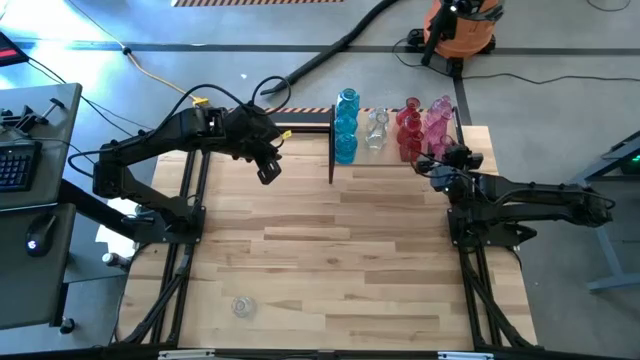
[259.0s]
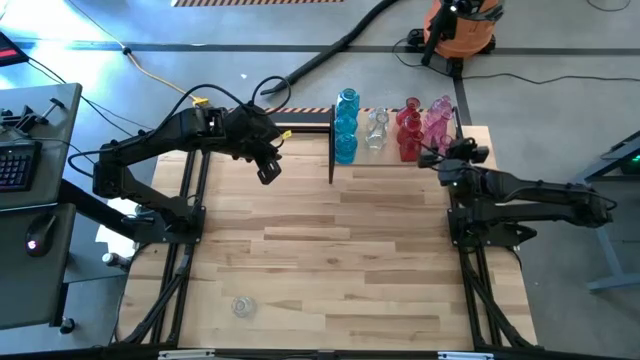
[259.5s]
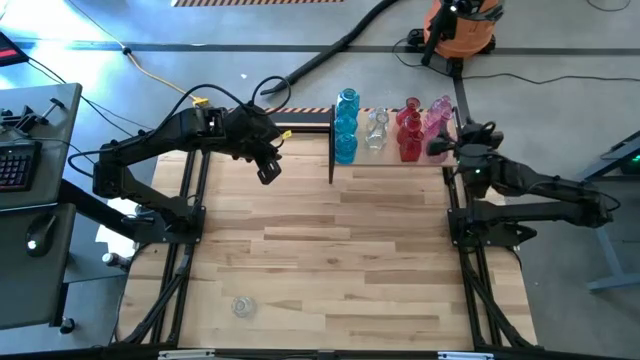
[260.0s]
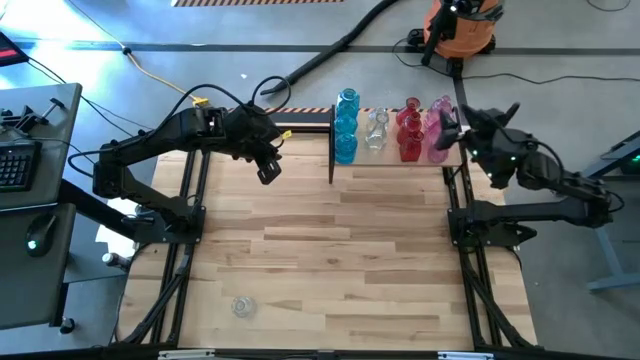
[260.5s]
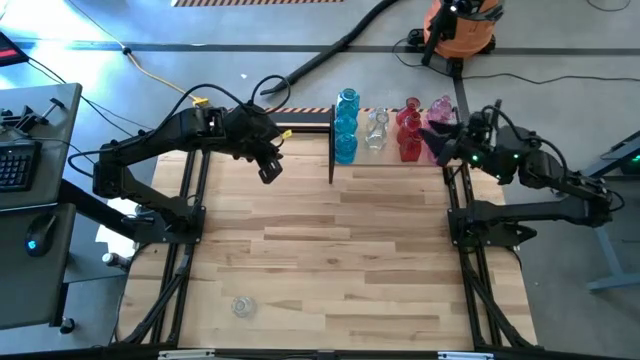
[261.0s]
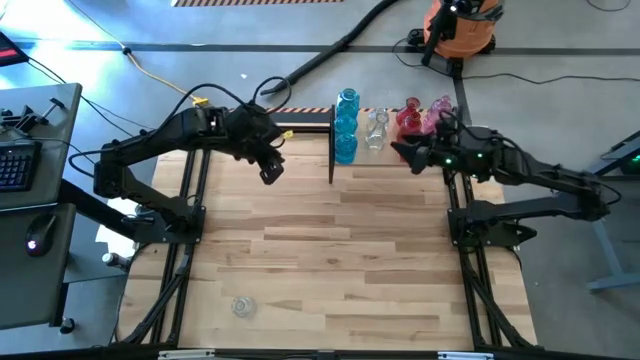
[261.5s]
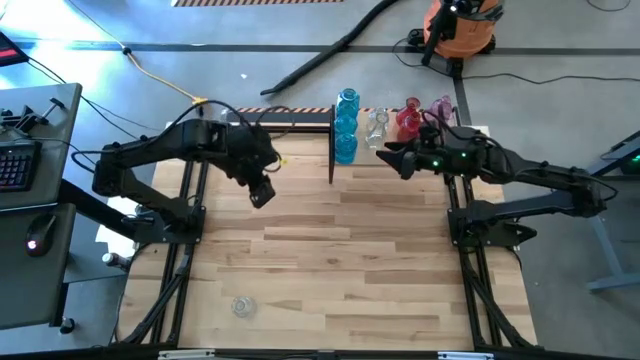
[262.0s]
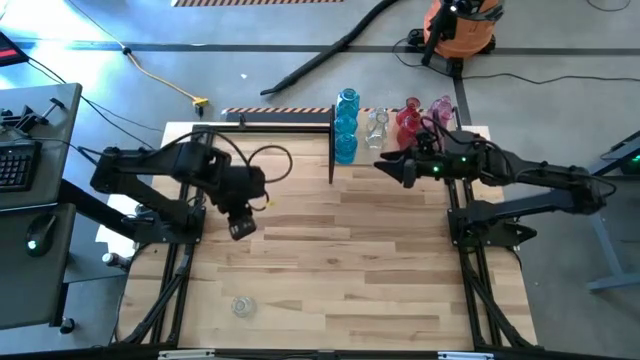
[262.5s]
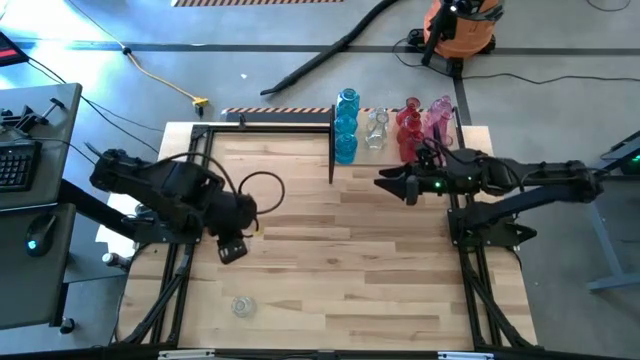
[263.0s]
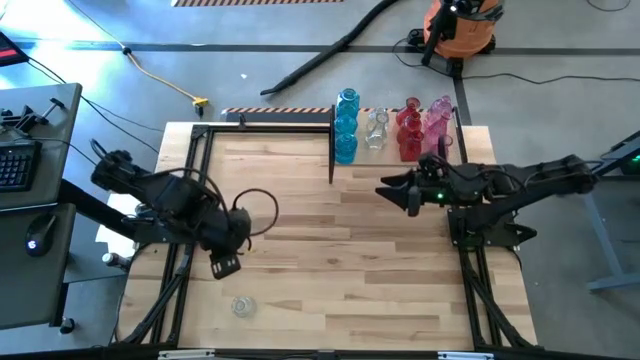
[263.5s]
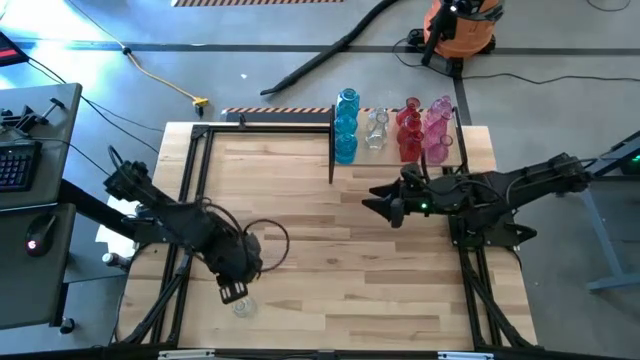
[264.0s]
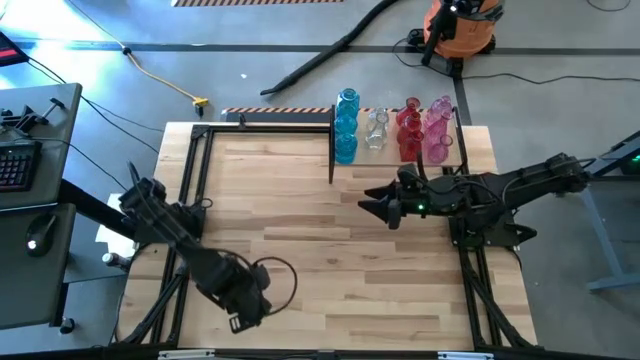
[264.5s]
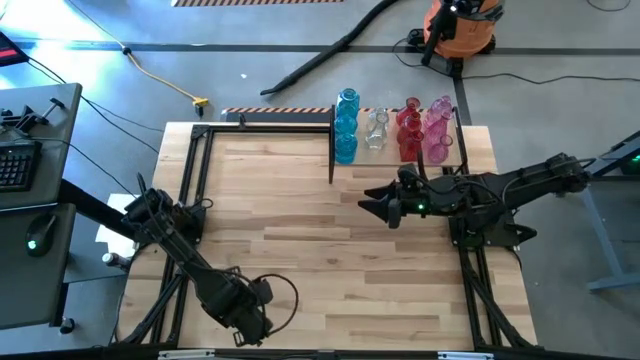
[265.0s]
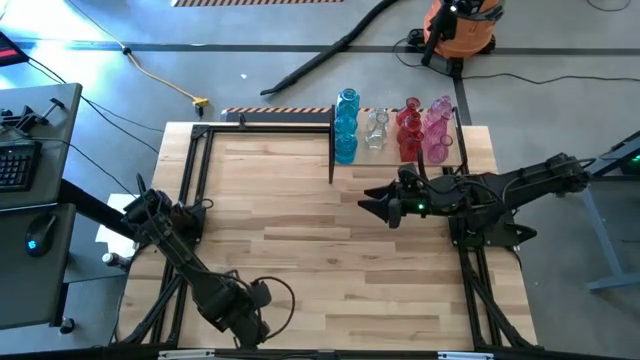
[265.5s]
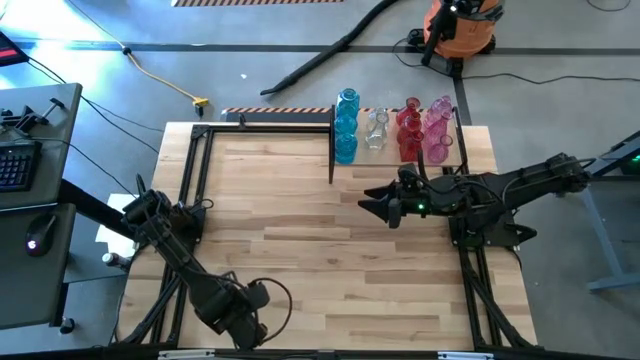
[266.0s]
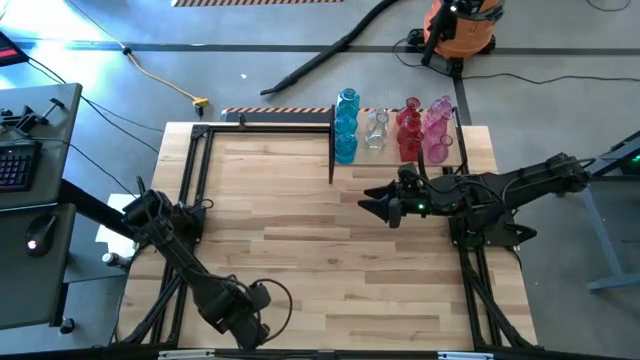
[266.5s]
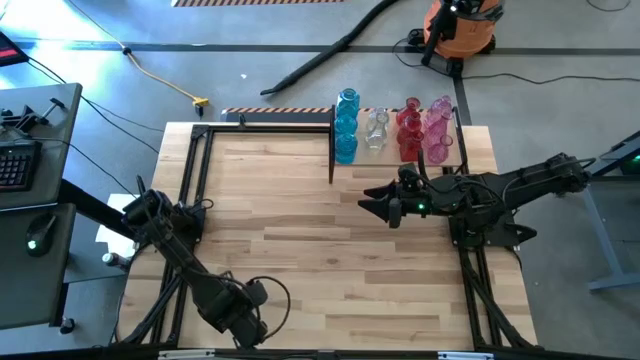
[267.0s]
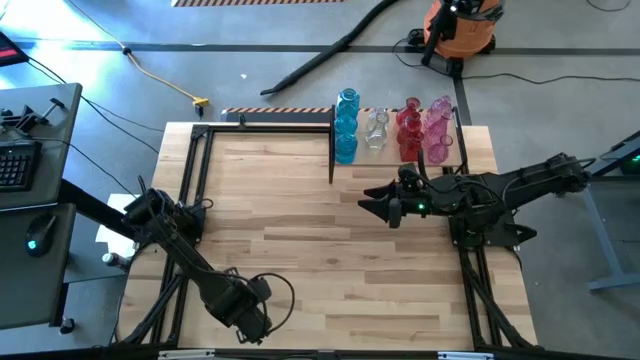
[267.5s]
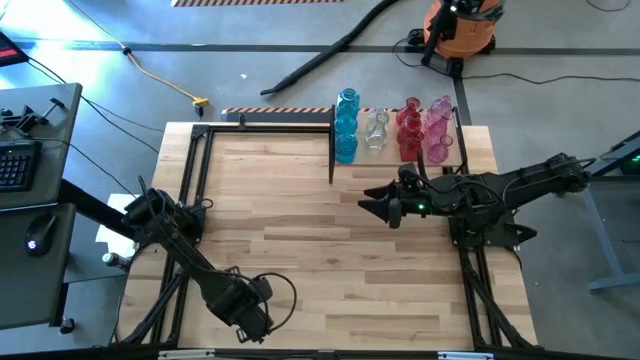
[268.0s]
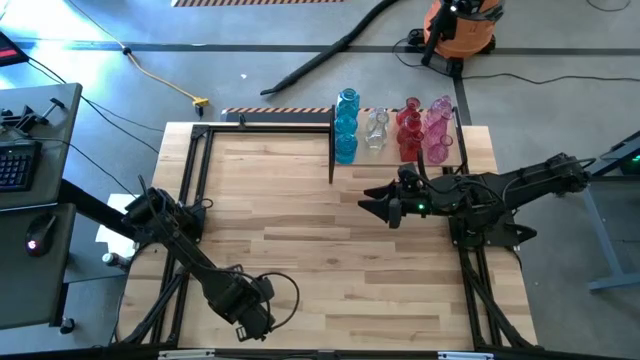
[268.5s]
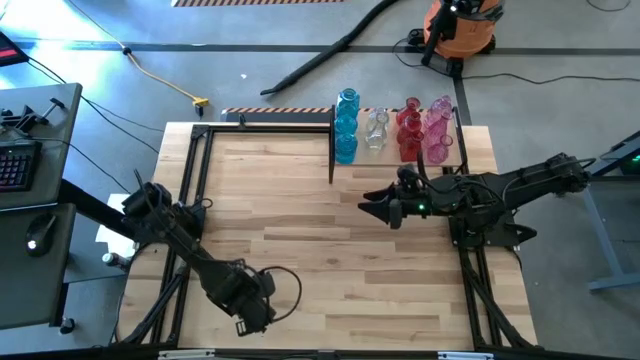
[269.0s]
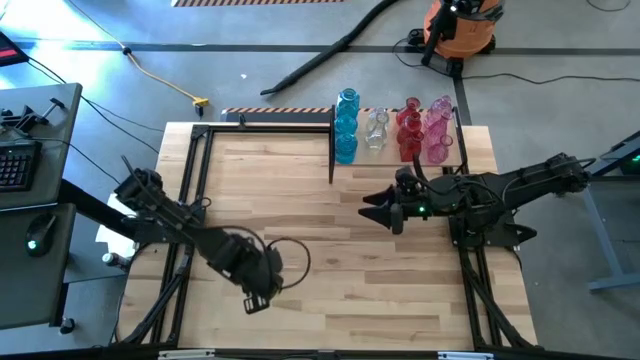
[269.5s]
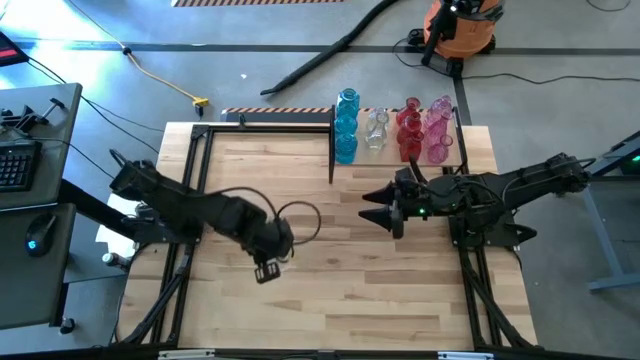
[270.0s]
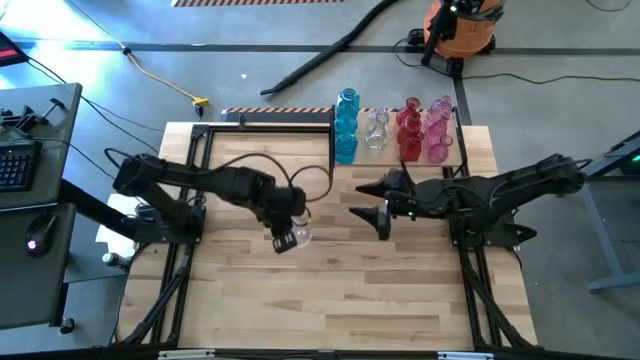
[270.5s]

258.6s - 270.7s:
Task: sort vases onto shelf
Put the transparent vase on the shelf aligned with the other transparent vase

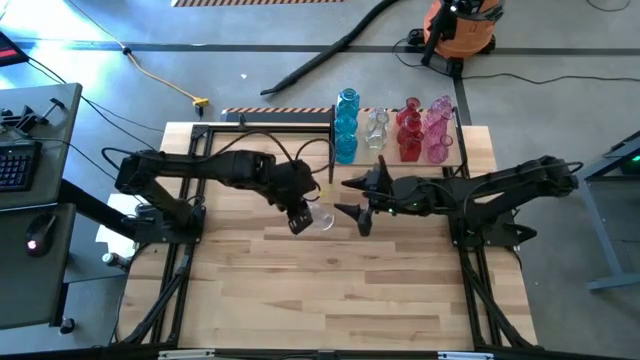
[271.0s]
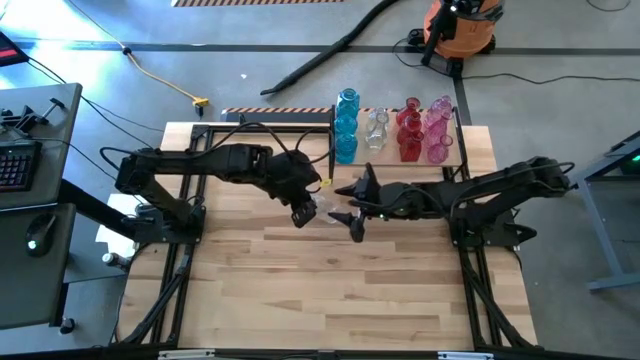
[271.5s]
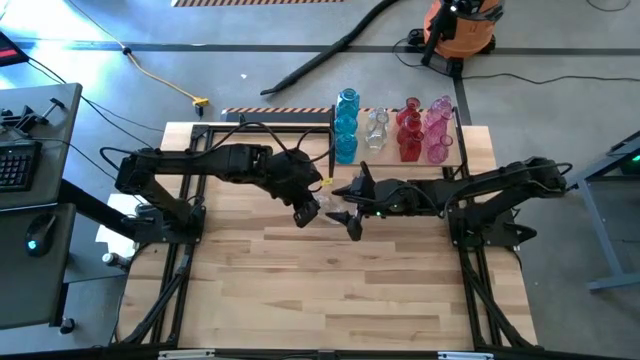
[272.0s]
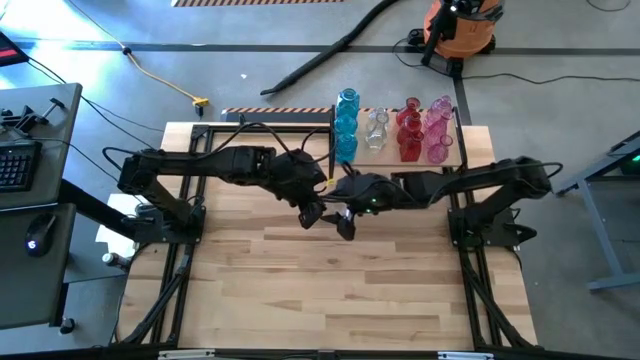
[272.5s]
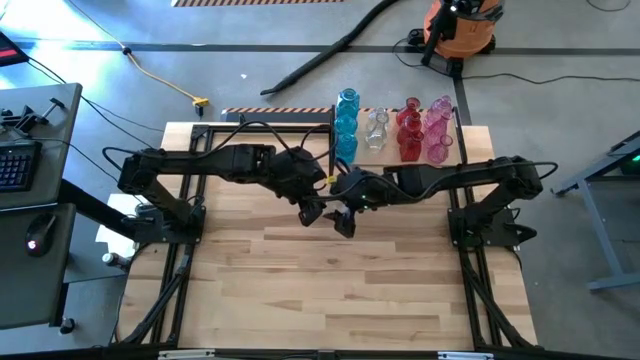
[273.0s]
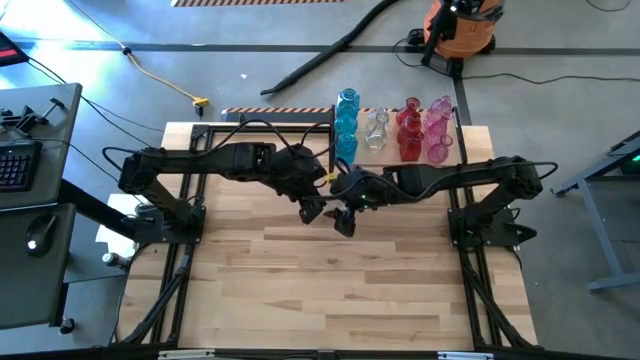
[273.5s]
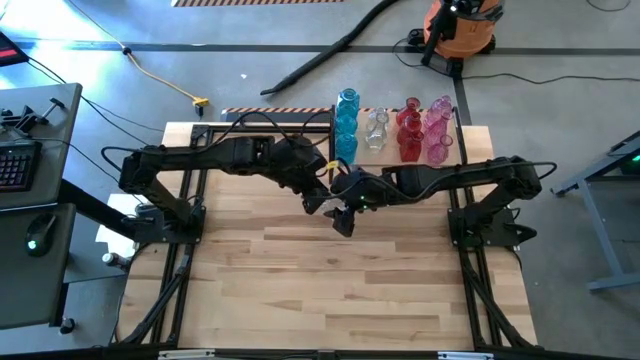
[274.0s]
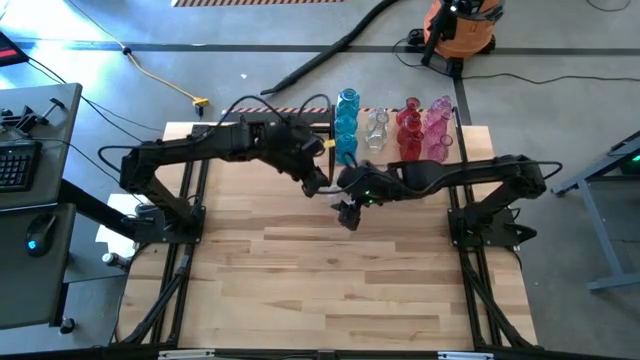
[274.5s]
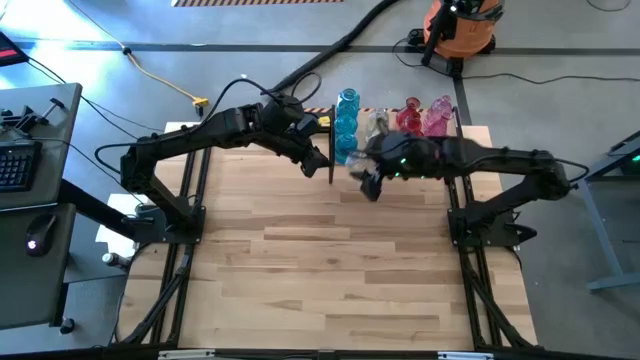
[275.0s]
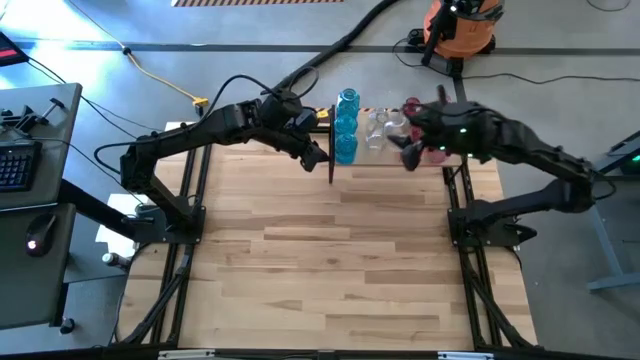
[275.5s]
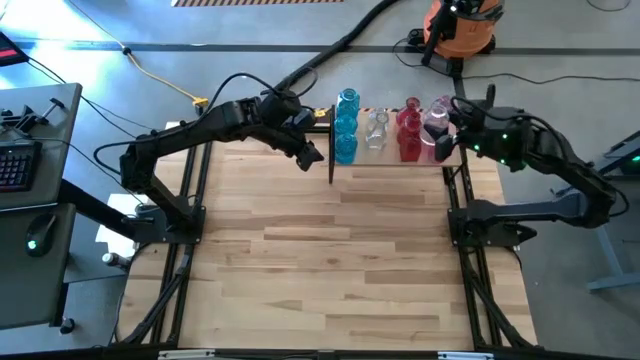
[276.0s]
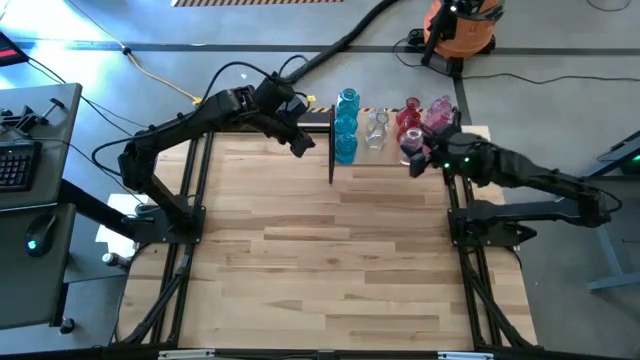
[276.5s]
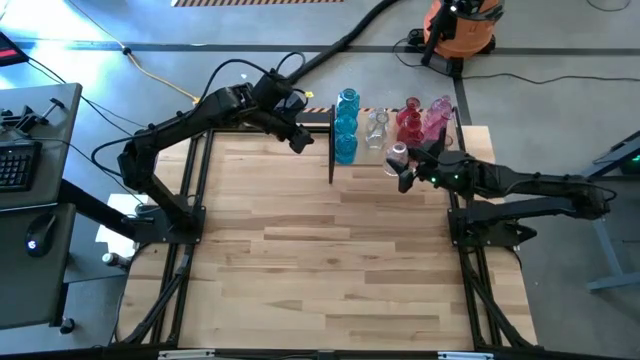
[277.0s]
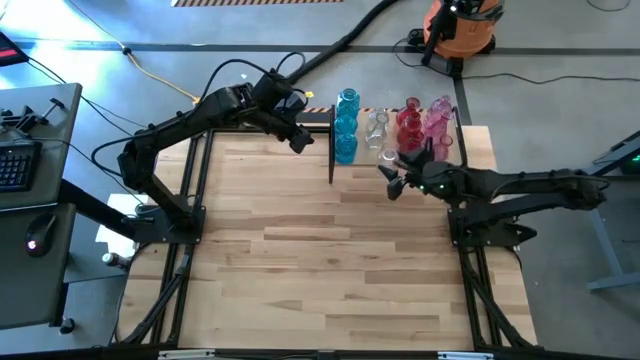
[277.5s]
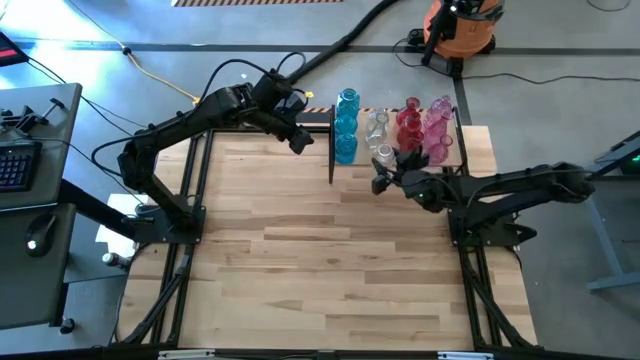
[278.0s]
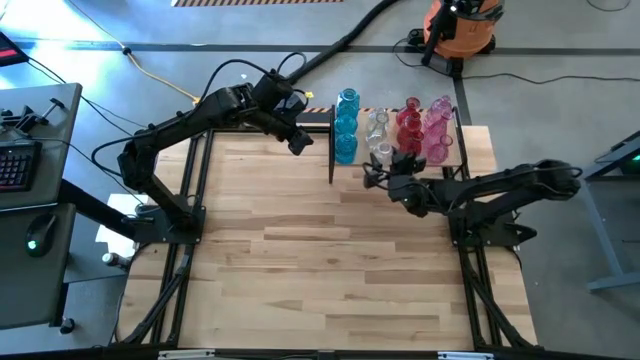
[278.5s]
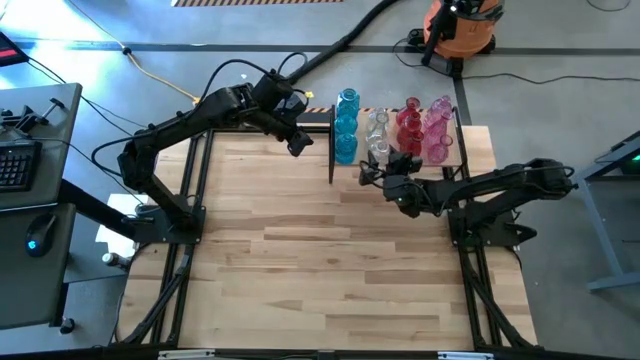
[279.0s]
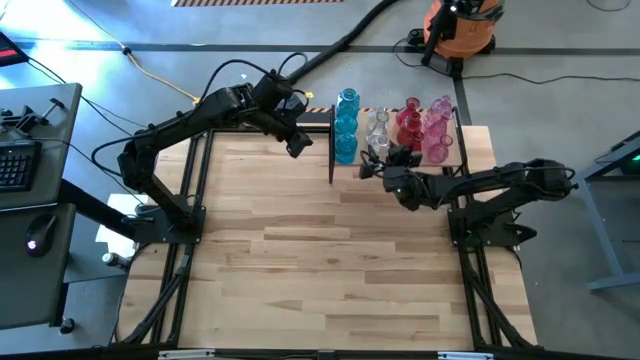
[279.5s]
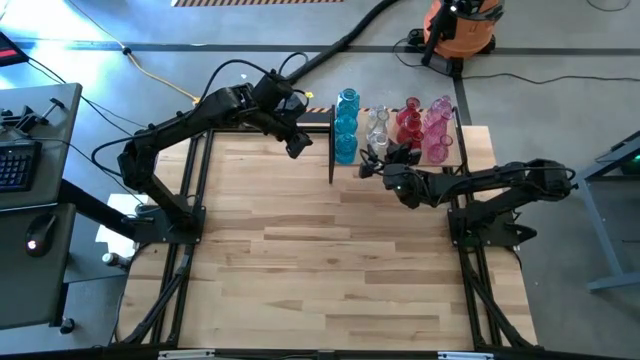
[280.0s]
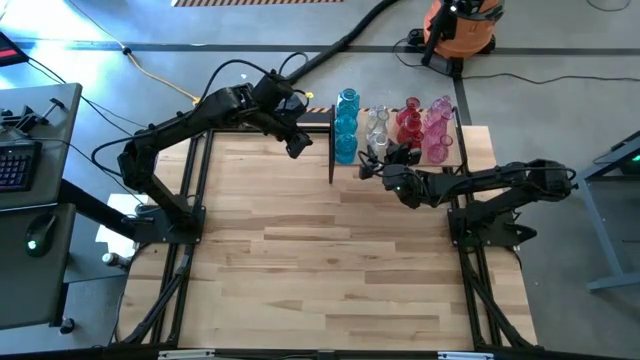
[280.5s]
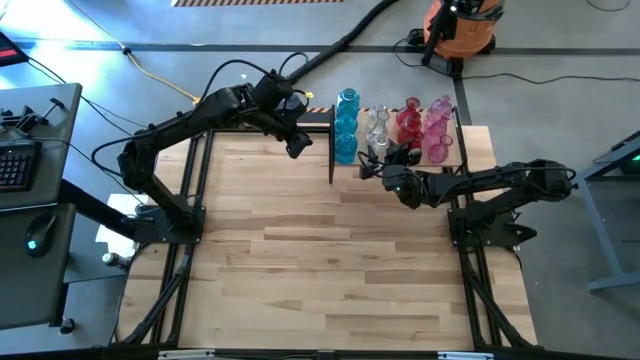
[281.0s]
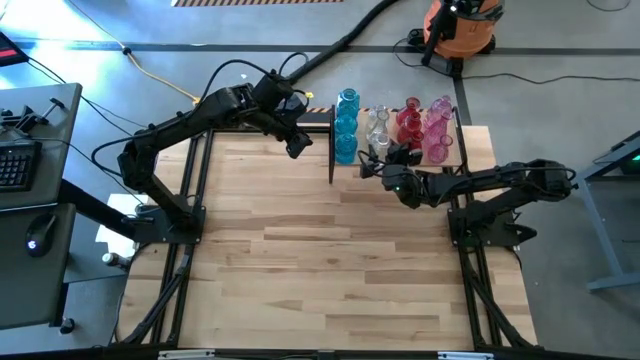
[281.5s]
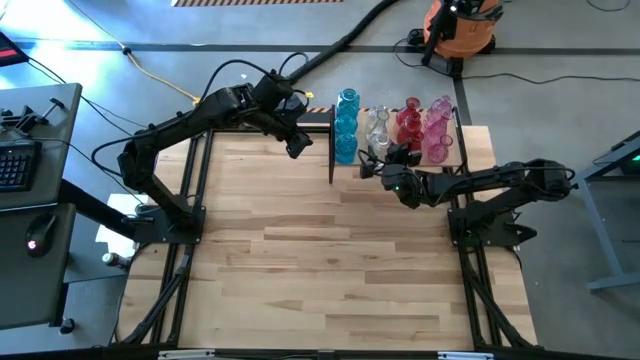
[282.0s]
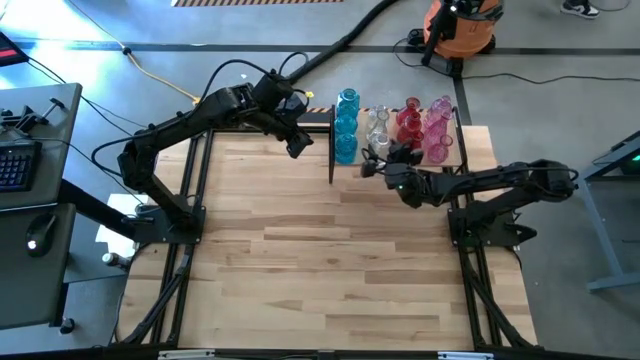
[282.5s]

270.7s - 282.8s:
Put the transparent vase on the shelf aligned with the other transparent vase
